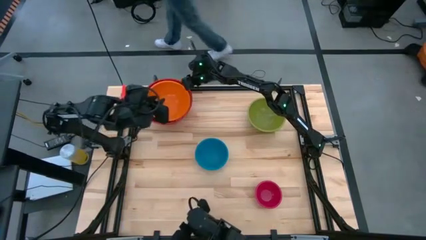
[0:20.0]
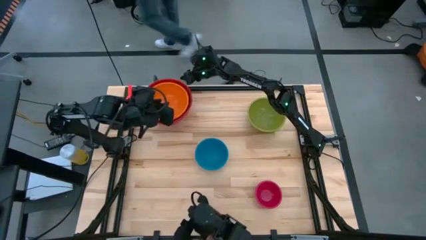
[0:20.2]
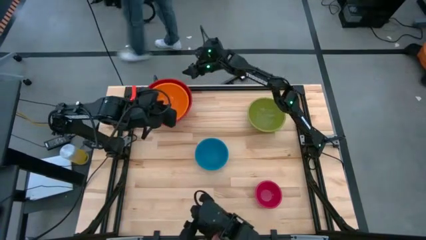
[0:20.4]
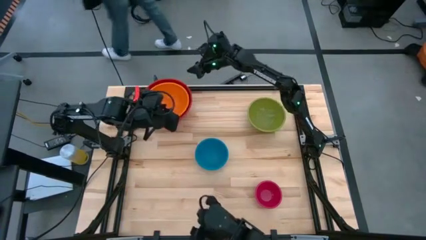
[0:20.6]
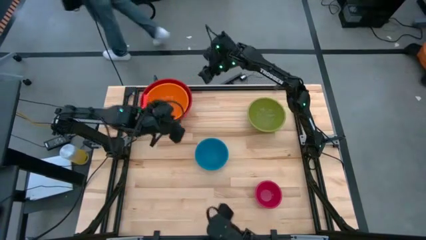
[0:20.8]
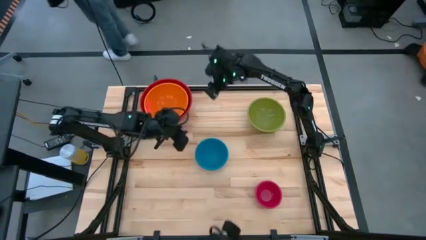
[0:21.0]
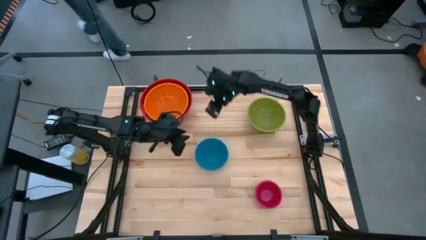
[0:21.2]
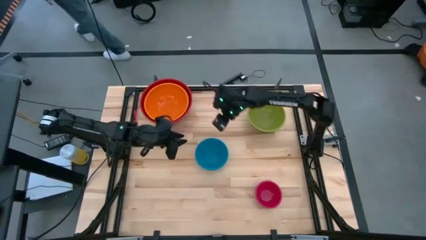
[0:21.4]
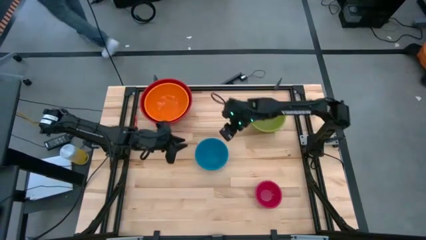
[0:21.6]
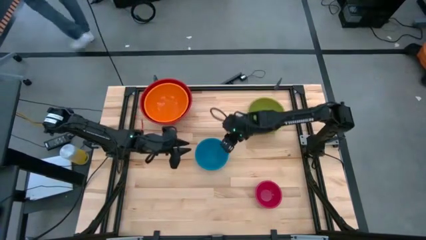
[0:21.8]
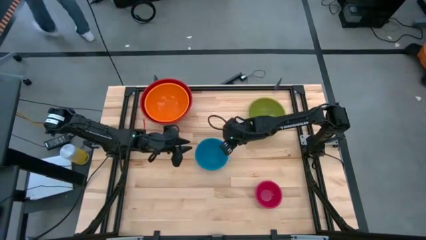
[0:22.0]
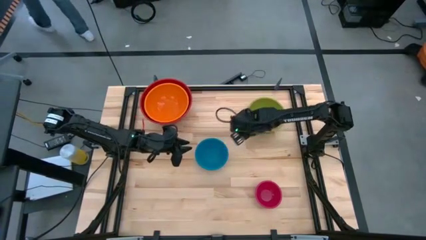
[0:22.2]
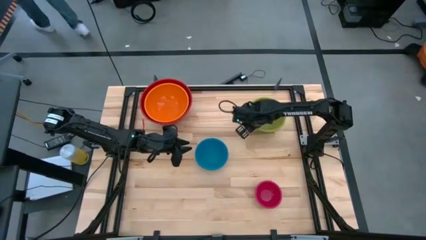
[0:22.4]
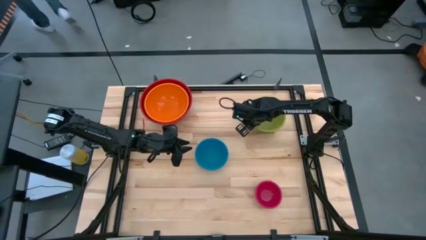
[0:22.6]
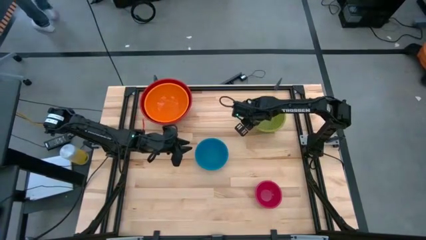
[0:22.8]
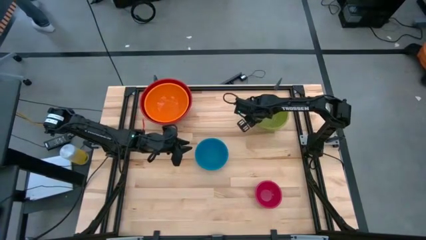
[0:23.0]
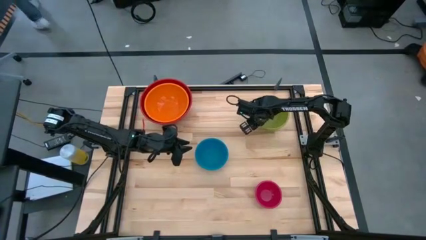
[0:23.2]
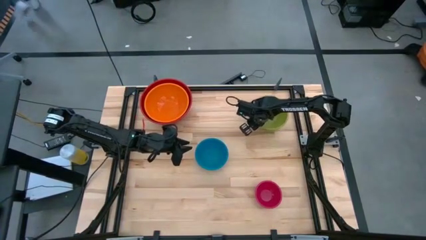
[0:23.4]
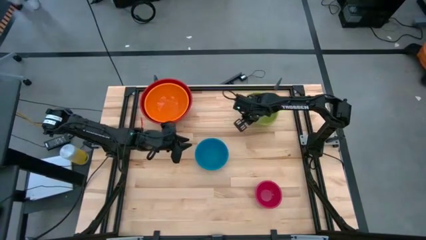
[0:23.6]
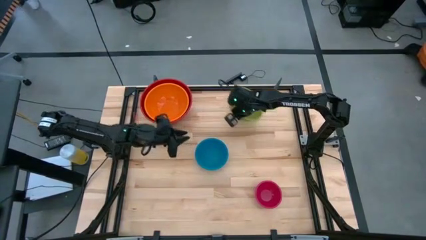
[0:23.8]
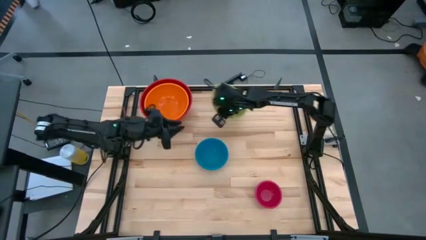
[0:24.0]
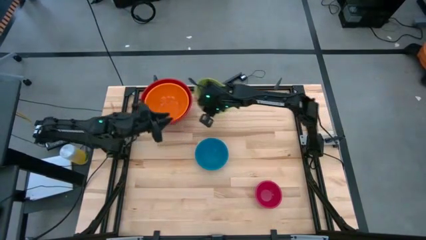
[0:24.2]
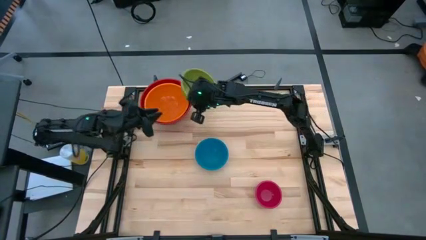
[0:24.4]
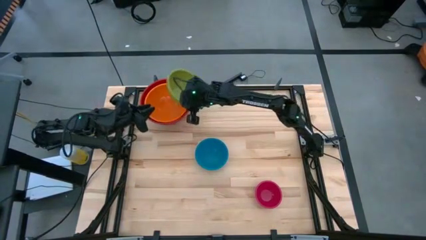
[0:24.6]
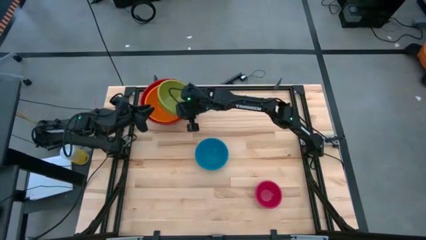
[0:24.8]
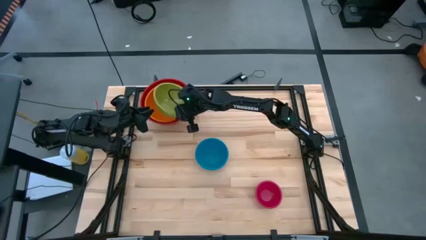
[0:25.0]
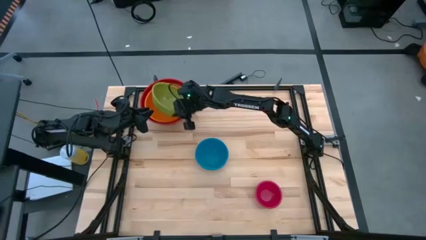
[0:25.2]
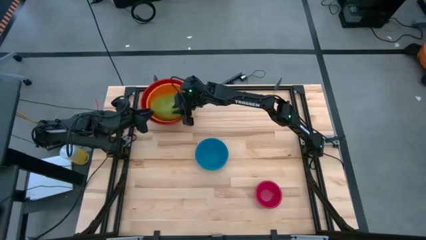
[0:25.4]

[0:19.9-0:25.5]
Stack the green bowl into the orange bowl

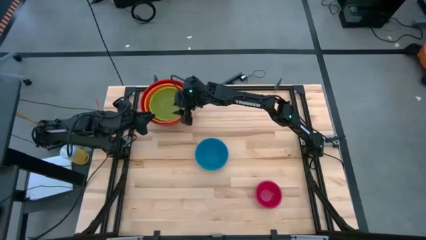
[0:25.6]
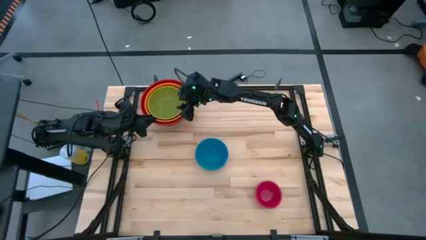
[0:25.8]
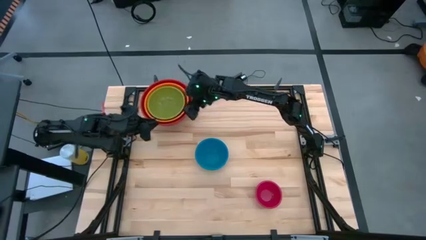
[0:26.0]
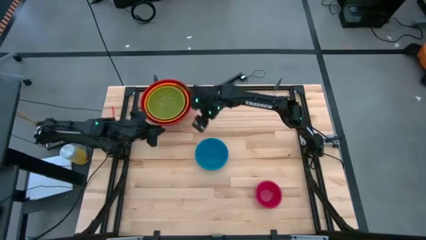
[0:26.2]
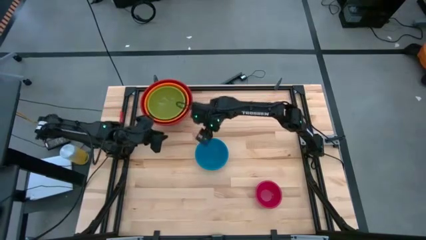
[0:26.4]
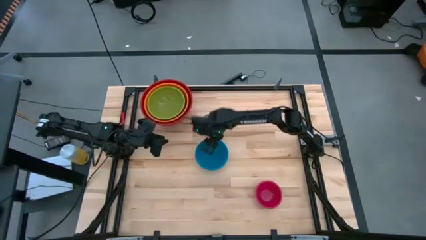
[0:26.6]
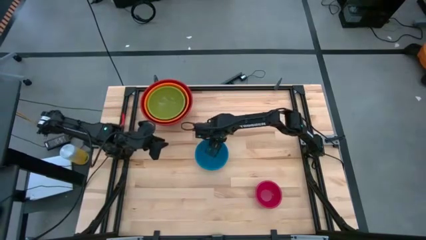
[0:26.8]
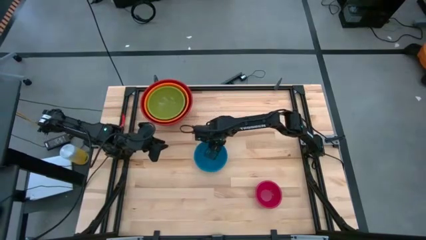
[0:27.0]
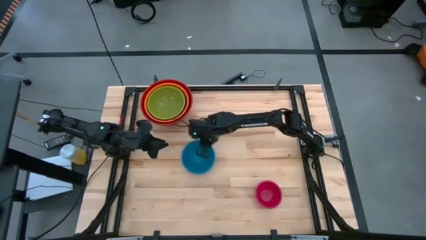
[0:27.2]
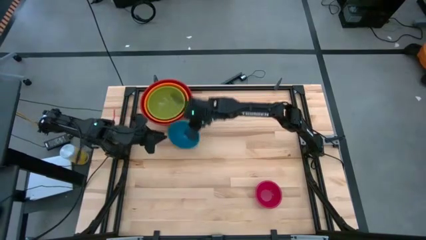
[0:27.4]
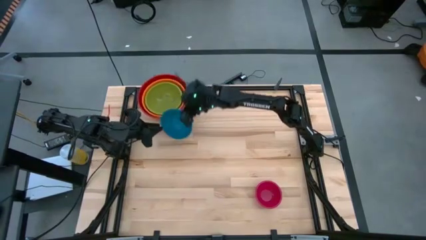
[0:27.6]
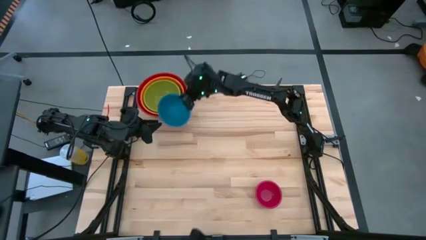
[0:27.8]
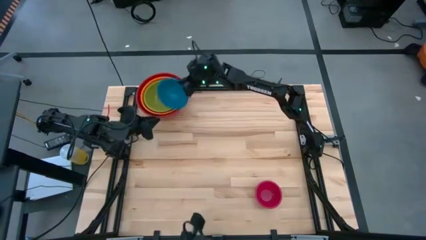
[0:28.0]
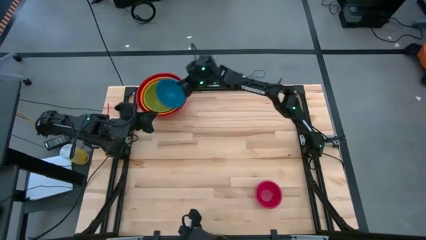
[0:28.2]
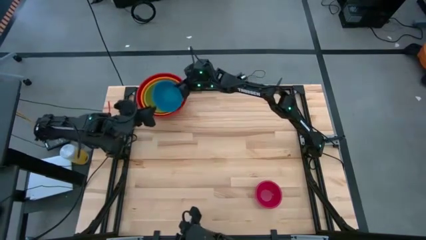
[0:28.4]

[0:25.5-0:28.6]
Stack the blue bowl into the green bowl

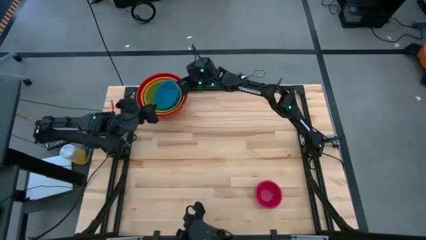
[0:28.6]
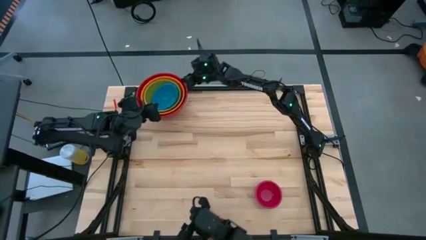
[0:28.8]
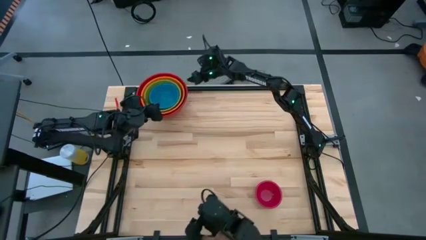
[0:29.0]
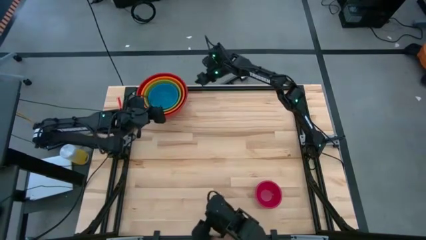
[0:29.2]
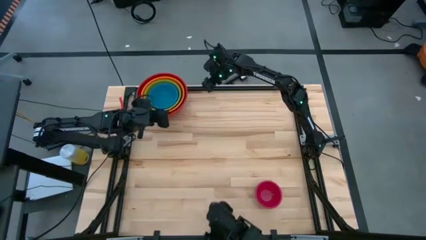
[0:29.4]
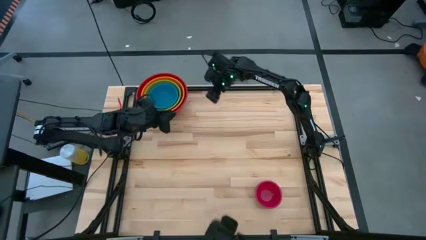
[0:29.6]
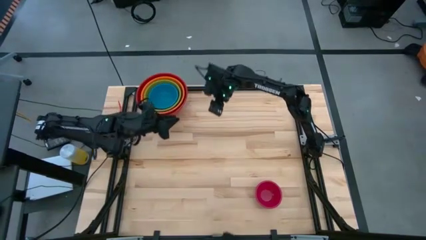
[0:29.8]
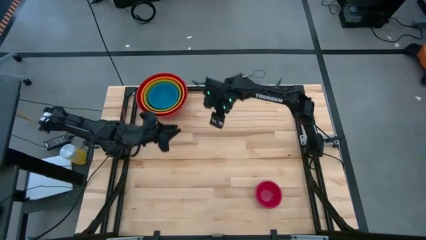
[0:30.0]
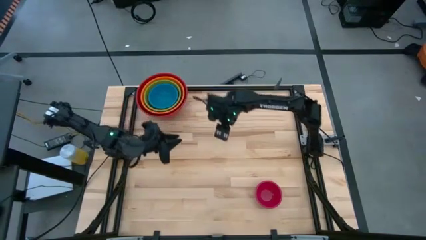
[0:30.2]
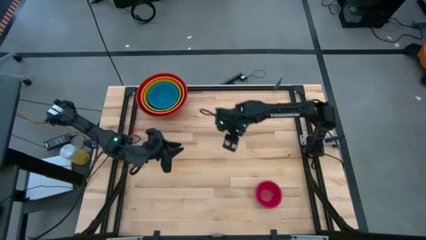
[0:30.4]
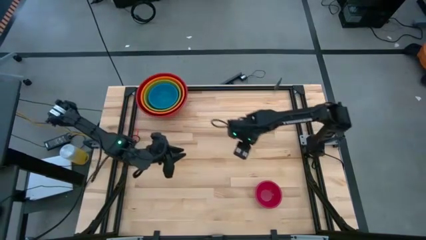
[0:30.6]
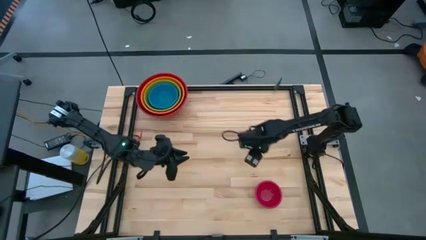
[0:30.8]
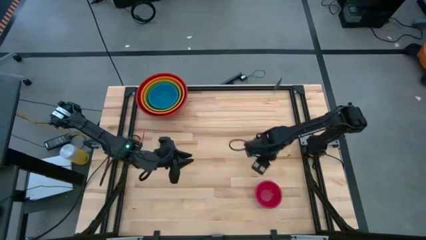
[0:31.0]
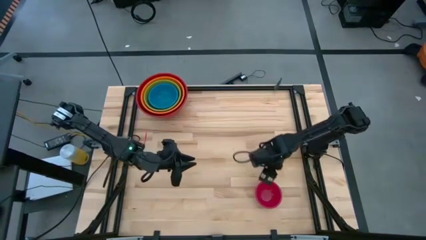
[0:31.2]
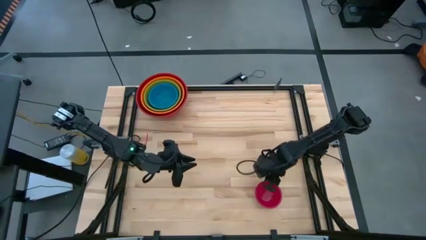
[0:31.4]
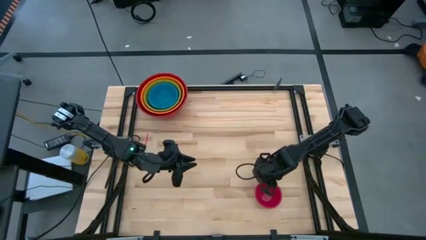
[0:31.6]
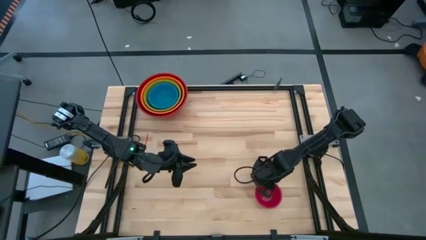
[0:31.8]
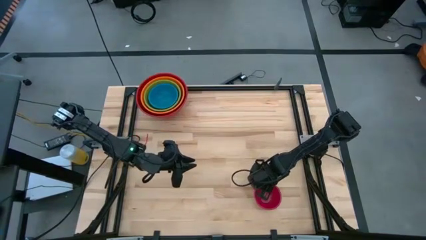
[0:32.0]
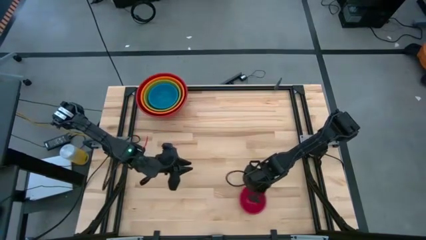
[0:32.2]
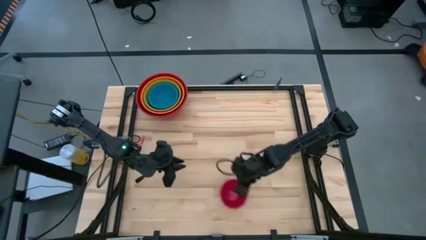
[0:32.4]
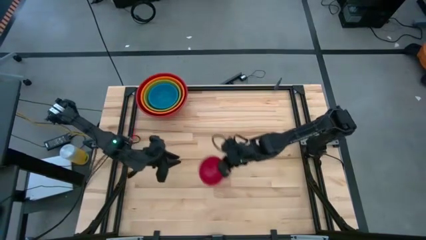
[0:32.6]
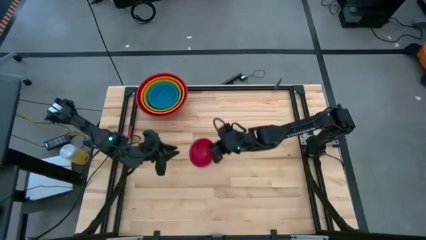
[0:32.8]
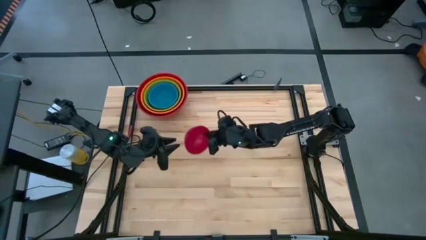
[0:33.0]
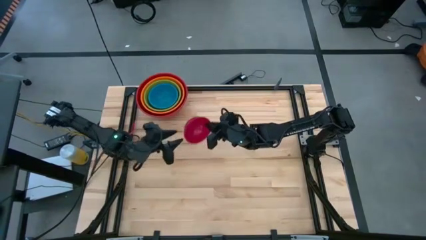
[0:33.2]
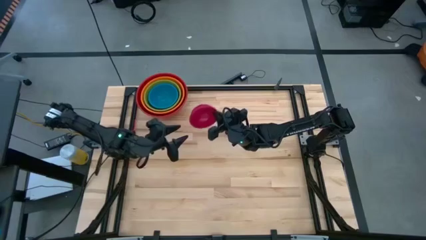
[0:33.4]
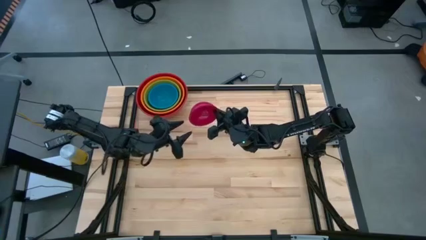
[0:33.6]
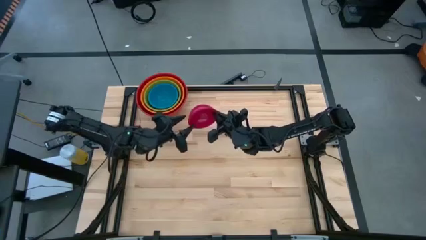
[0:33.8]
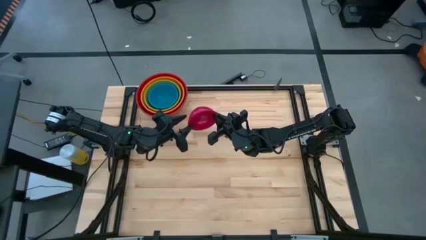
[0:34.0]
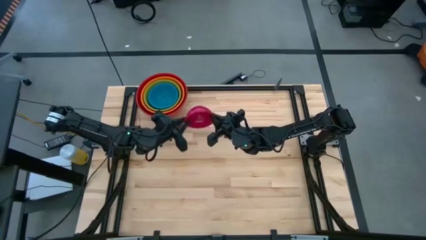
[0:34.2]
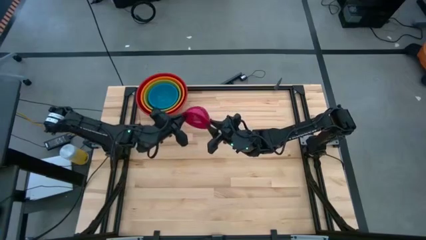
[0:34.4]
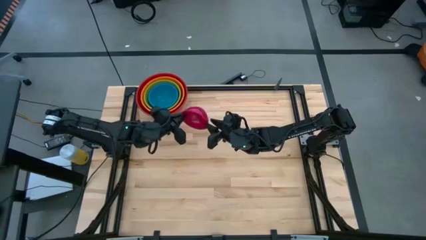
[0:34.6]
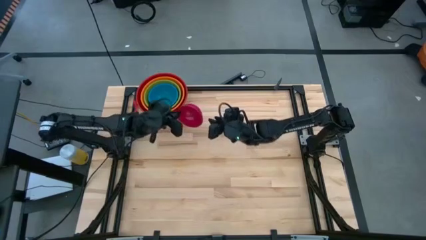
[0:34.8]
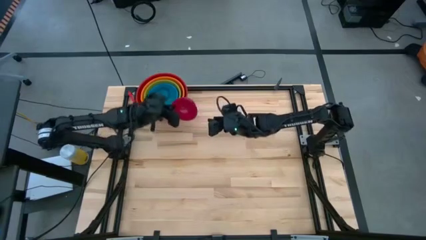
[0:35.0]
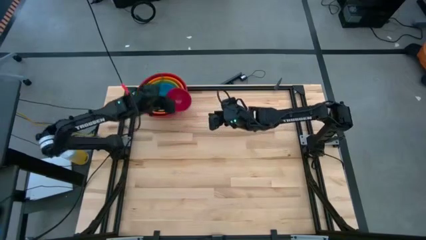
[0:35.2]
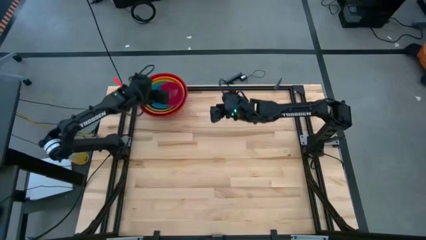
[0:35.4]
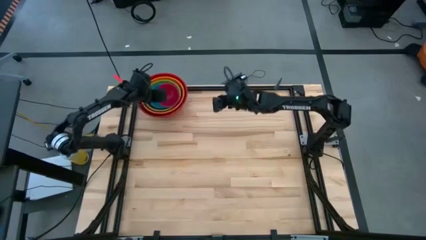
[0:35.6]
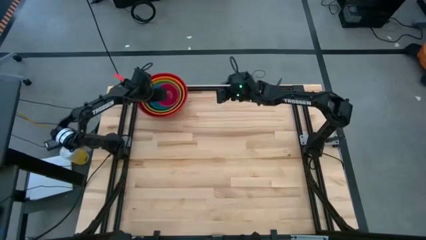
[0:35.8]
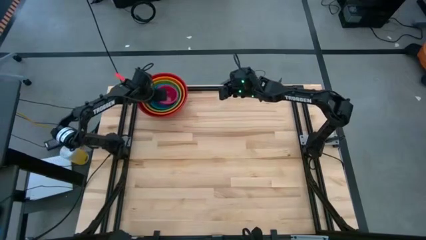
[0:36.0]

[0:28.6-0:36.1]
Stack the pink bowl into the blue bowl
